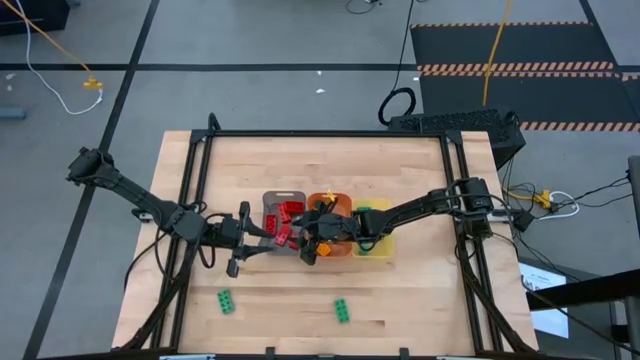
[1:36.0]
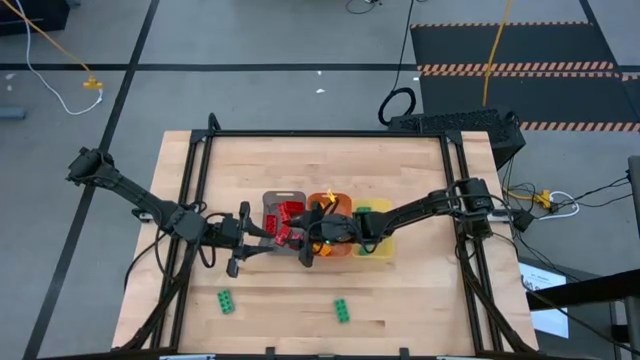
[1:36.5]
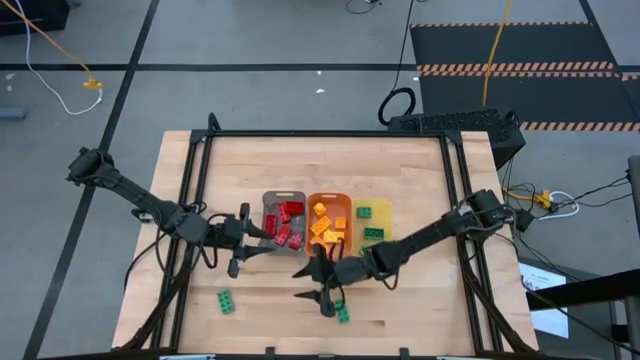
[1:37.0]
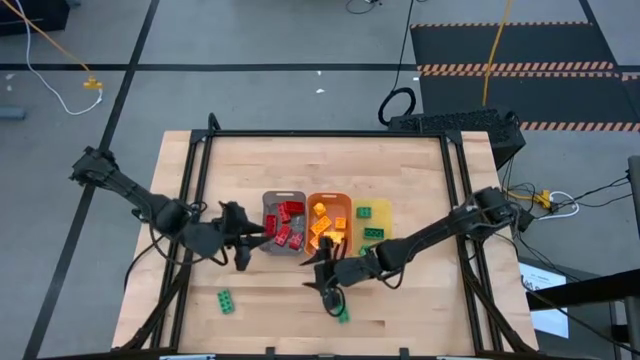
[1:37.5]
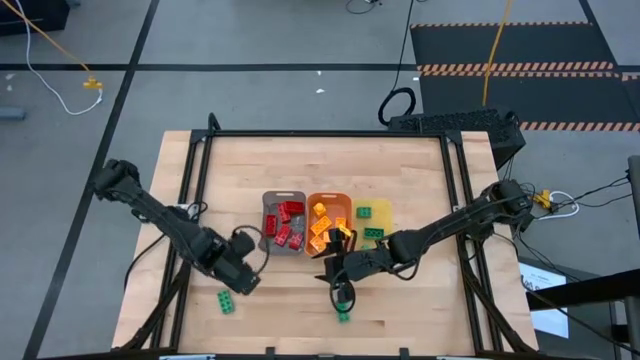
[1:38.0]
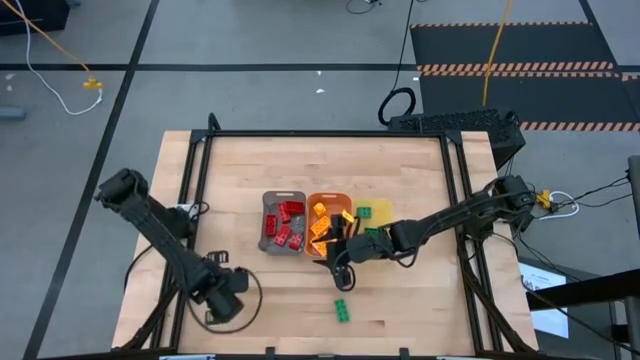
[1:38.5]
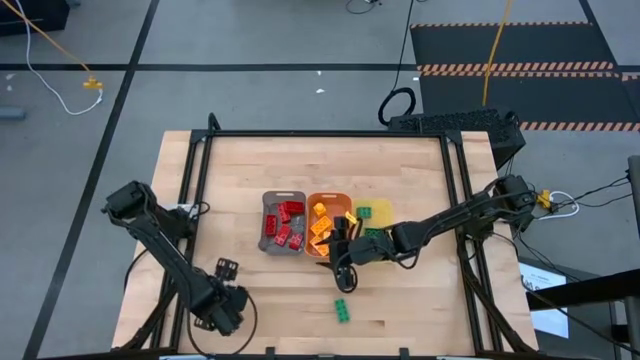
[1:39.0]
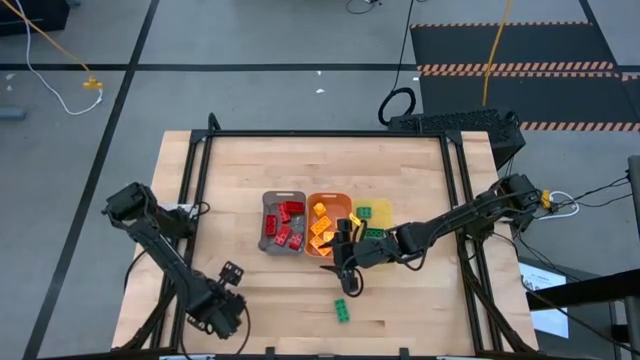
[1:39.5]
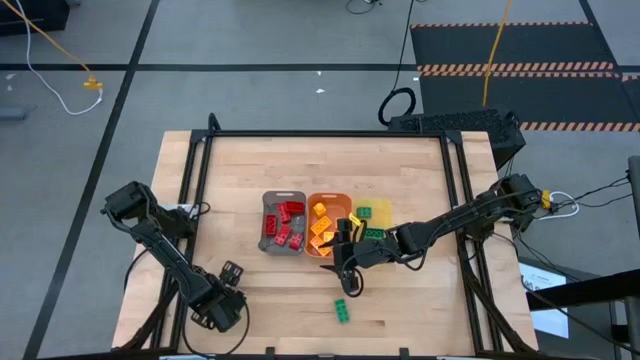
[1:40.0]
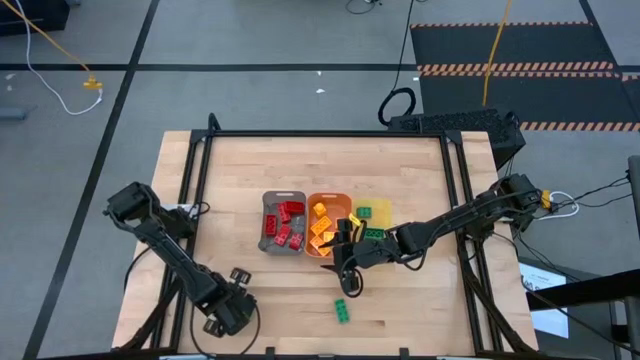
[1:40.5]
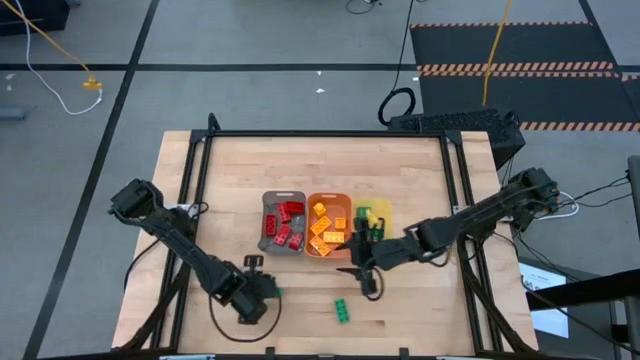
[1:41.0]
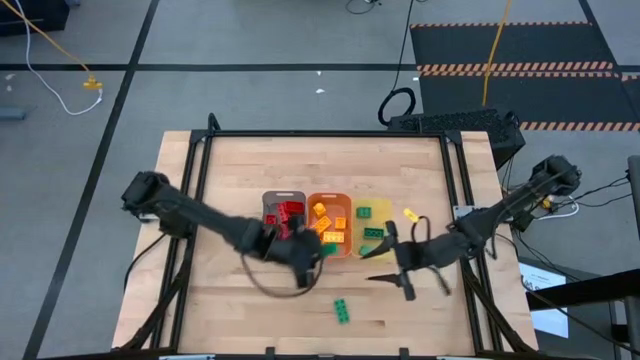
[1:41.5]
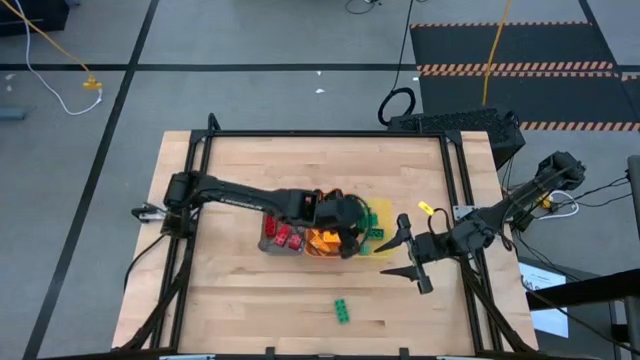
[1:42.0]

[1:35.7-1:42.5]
Task: Sort & place blocks by color
Put the green game piece into the yellow bin

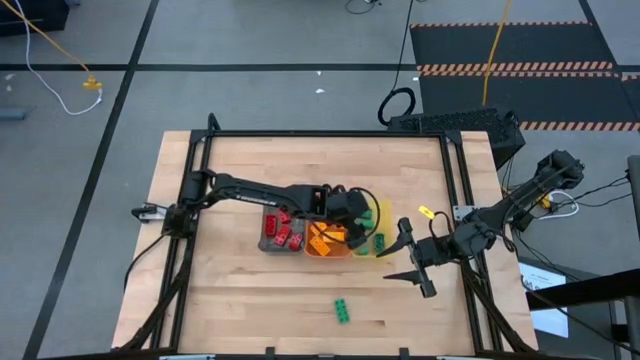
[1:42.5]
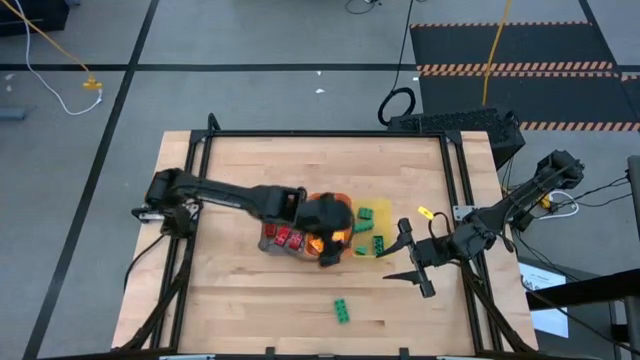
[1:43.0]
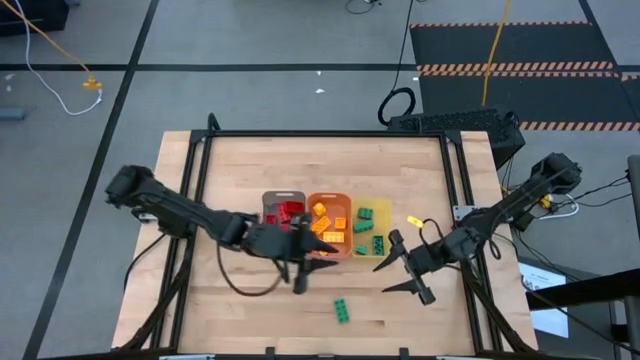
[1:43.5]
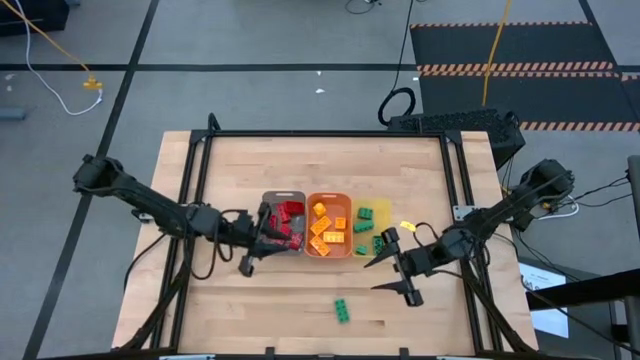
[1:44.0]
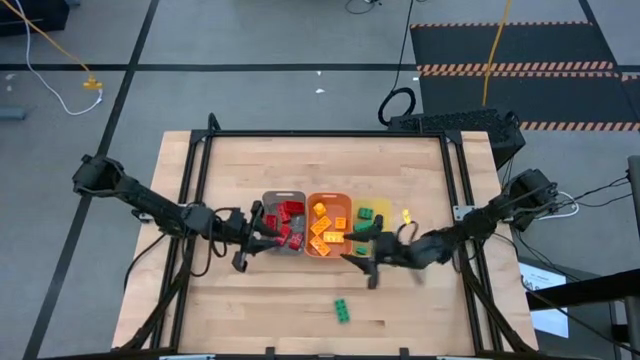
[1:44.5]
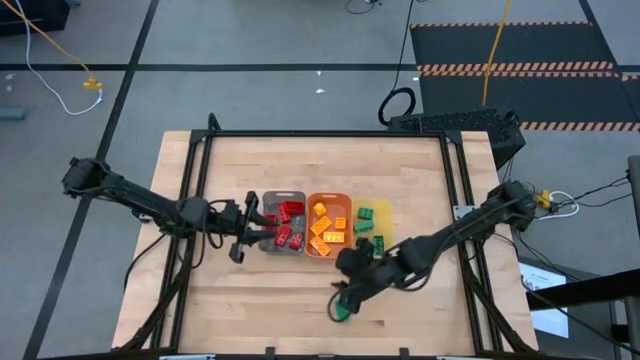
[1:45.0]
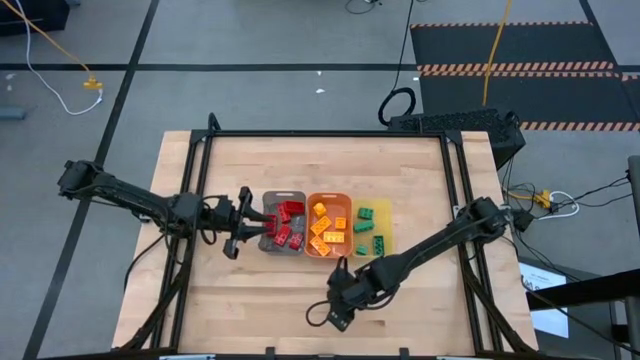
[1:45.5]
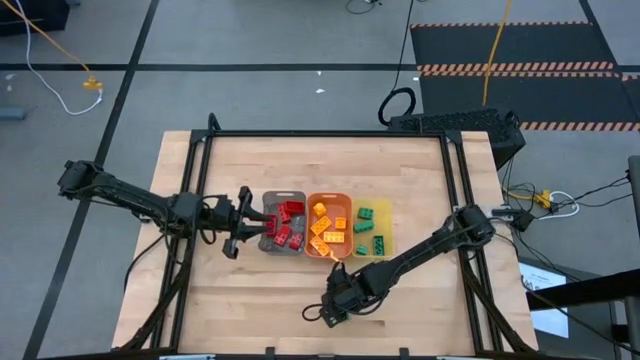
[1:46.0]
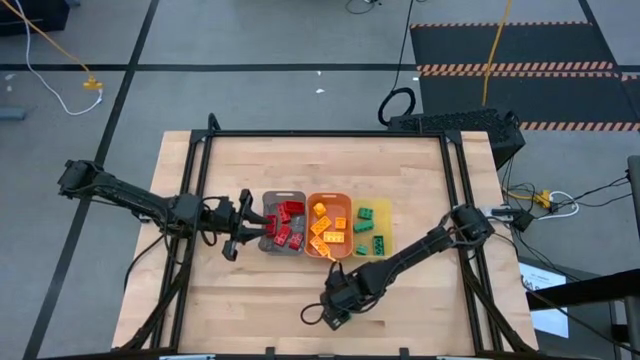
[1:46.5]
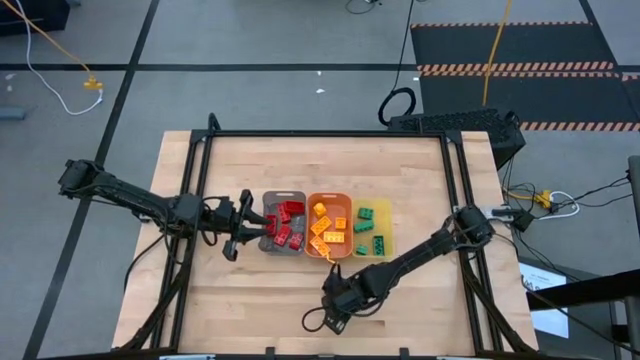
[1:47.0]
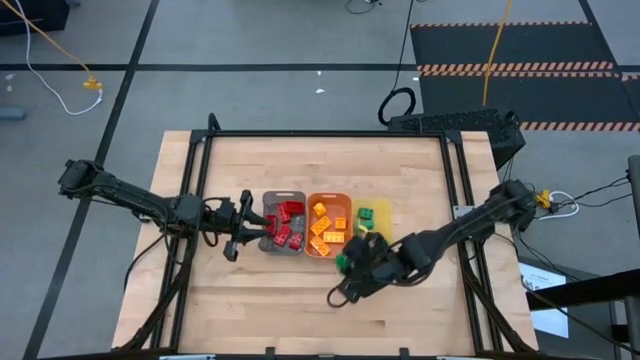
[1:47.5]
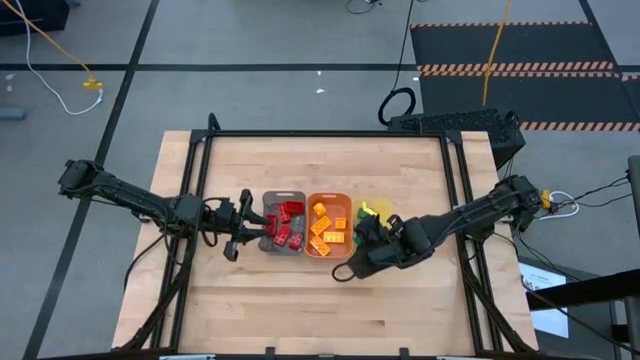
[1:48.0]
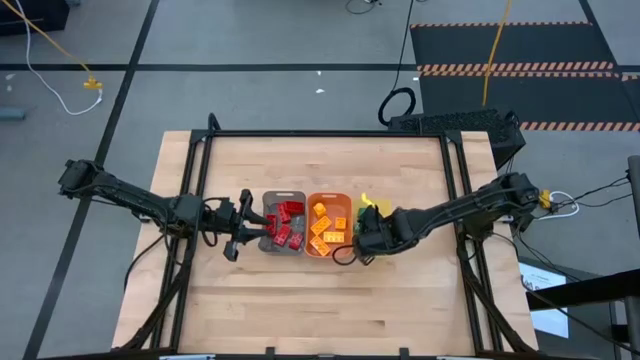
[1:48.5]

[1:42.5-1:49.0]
Put the green game piece into the yellow bin

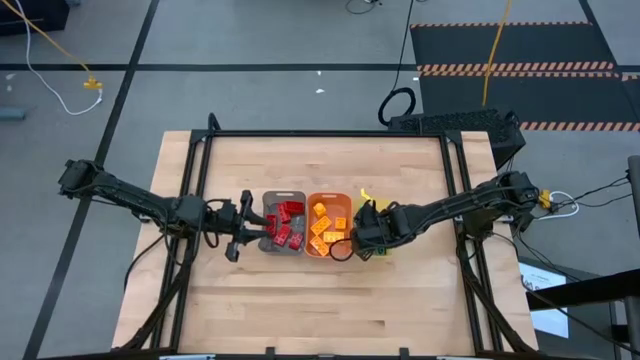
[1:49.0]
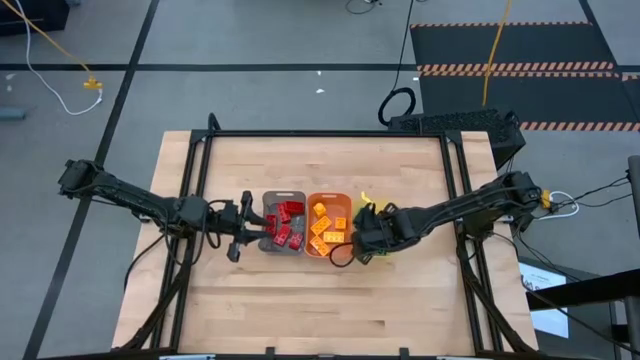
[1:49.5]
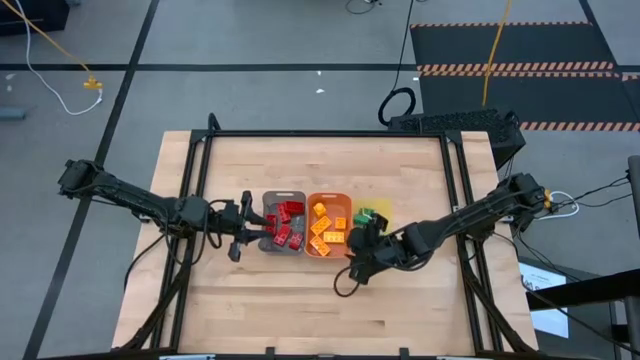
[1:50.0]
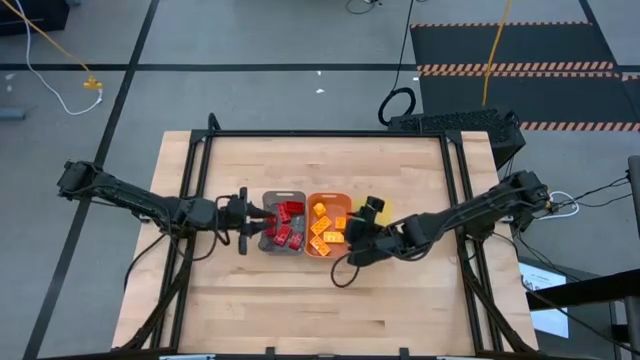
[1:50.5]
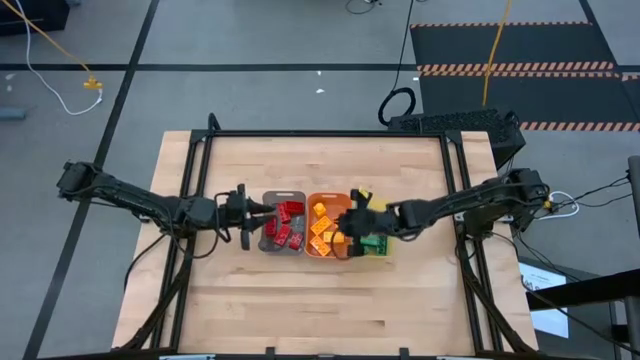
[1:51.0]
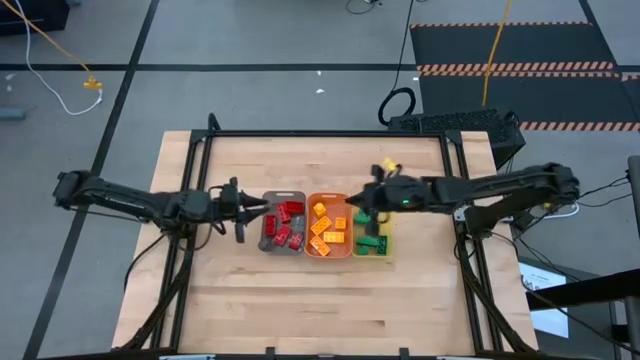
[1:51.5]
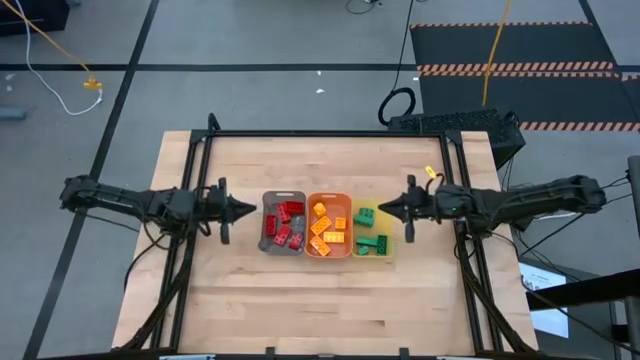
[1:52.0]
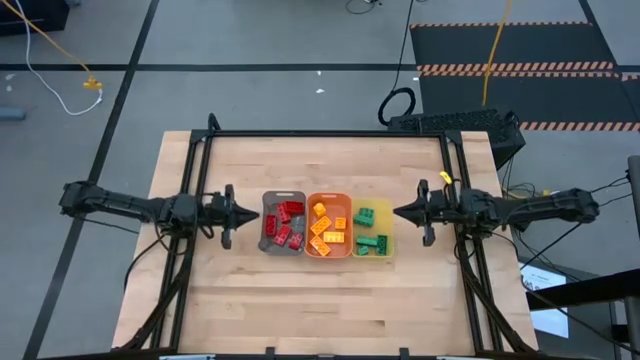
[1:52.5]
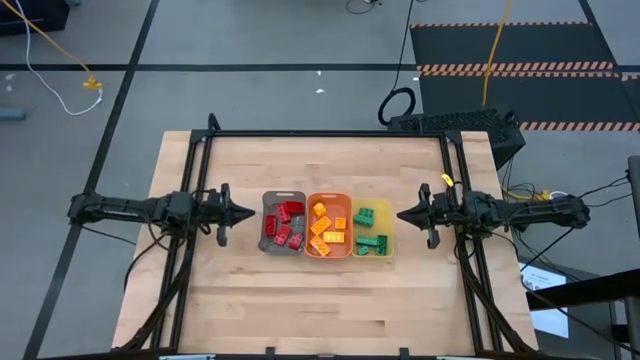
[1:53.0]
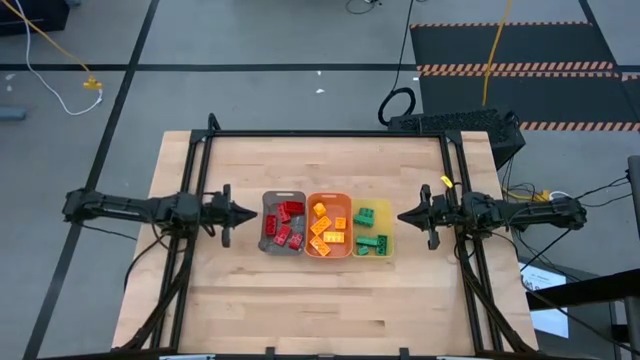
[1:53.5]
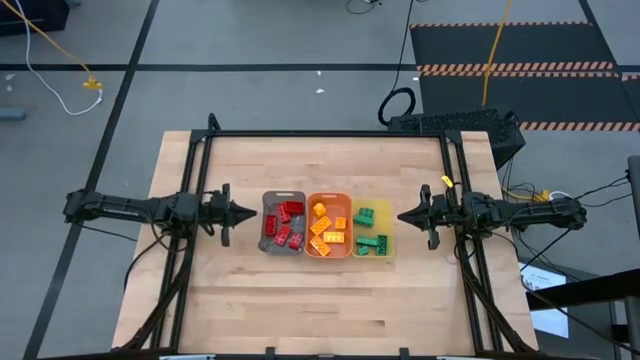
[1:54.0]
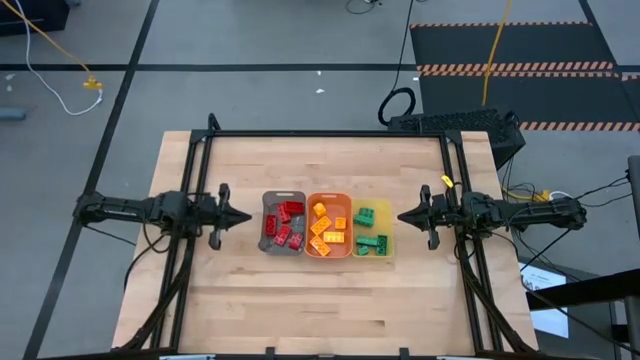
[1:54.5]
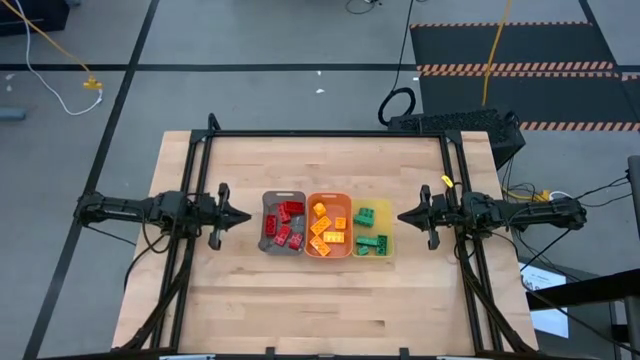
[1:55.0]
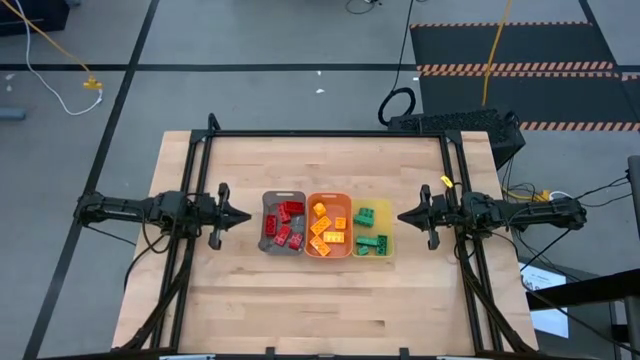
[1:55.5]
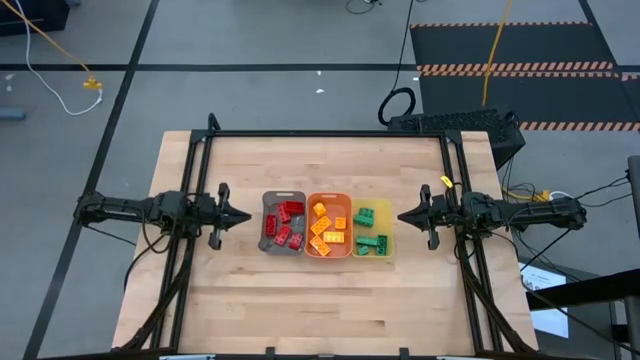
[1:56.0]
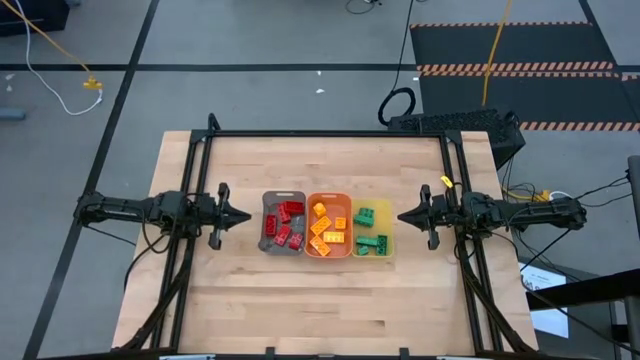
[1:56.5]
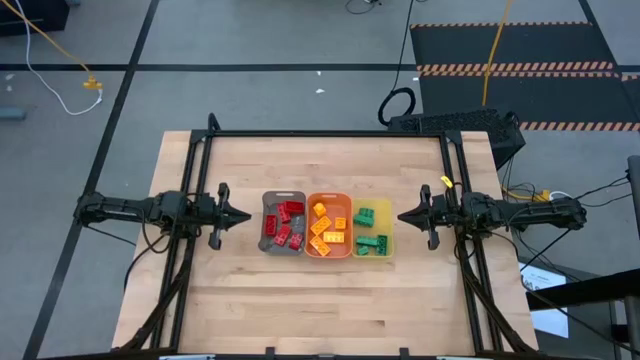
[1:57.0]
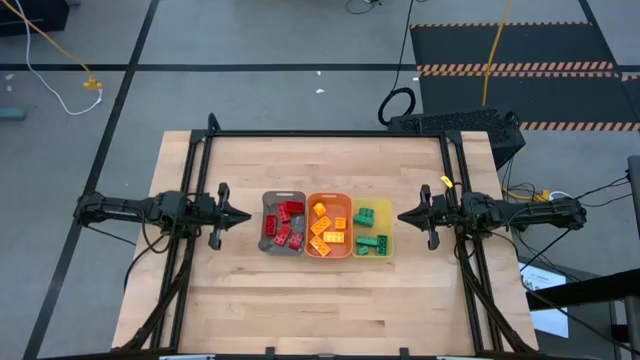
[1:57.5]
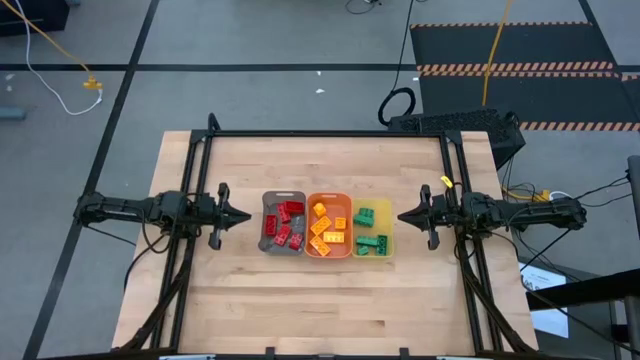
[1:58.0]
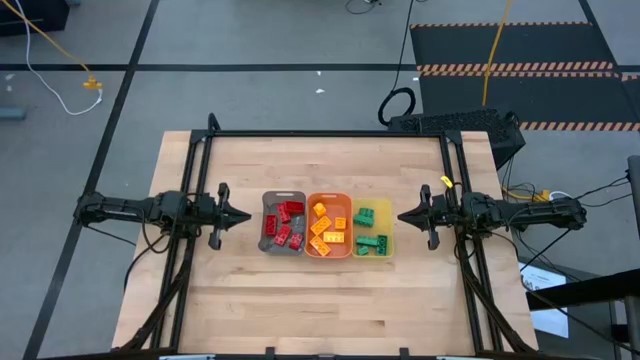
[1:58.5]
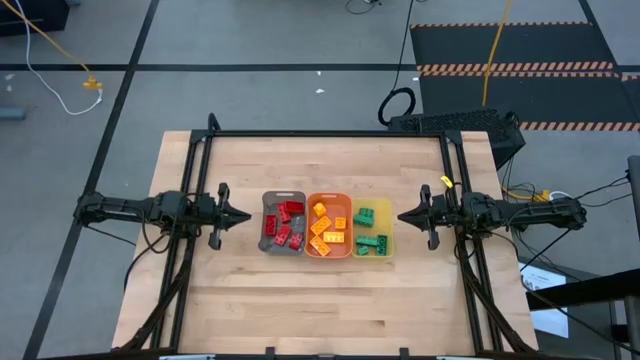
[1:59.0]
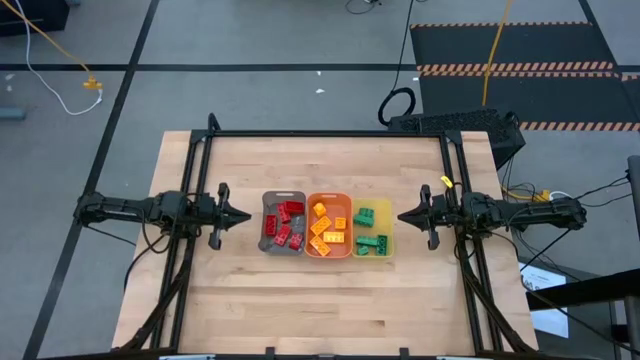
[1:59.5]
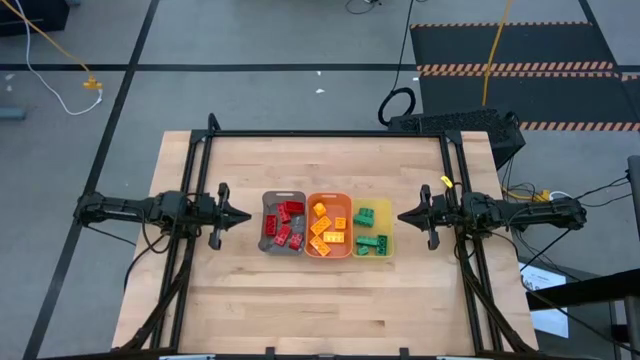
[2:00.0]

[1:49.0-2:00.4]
Return to Home Position
